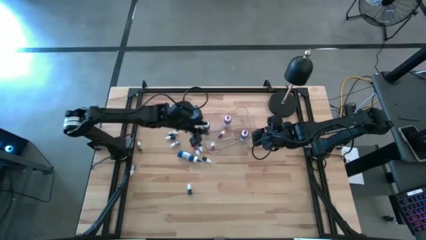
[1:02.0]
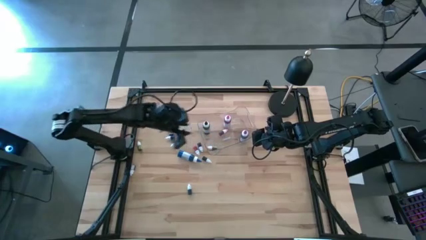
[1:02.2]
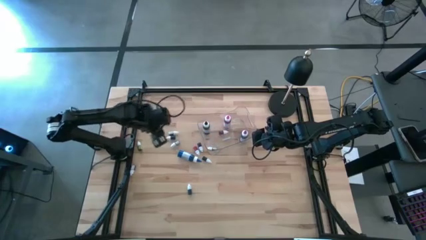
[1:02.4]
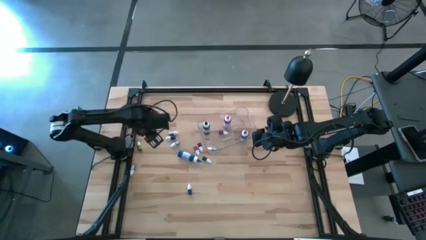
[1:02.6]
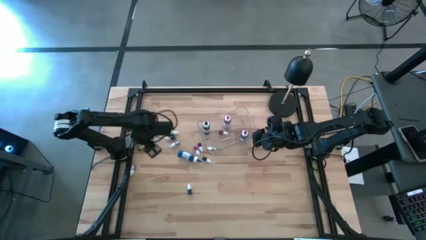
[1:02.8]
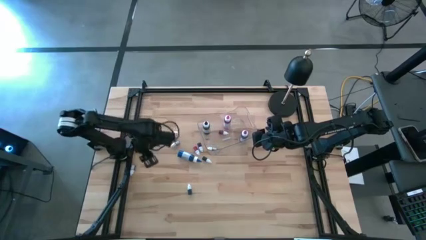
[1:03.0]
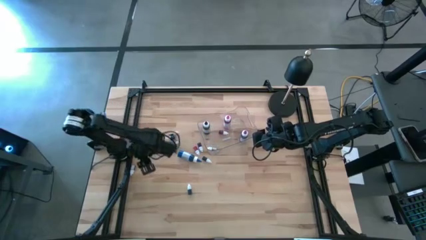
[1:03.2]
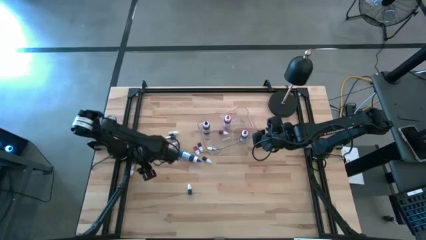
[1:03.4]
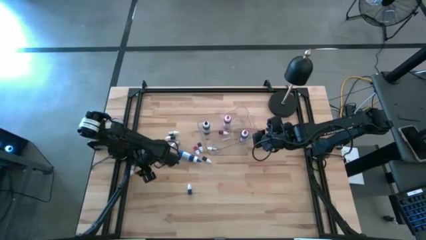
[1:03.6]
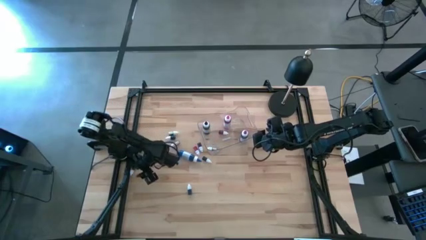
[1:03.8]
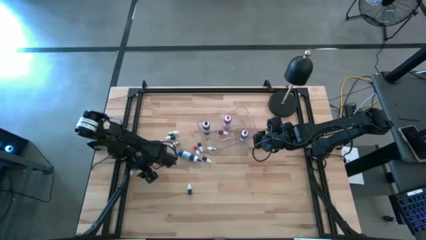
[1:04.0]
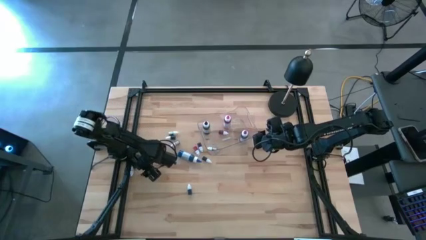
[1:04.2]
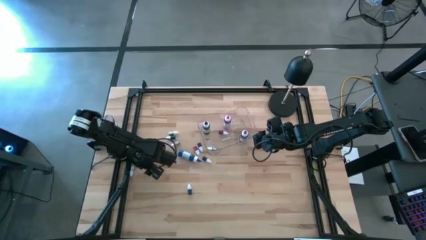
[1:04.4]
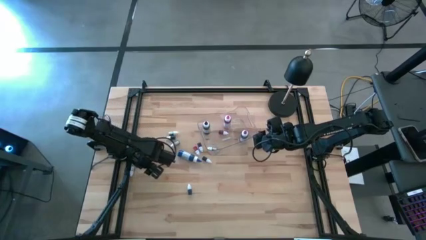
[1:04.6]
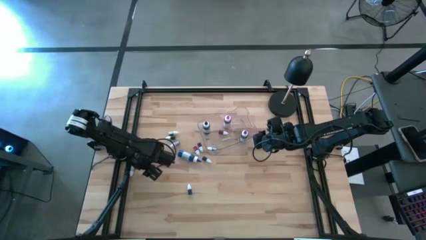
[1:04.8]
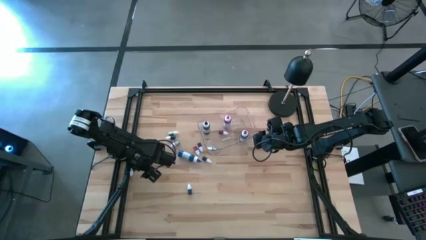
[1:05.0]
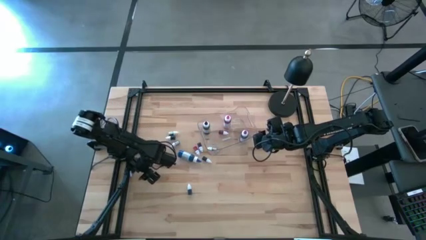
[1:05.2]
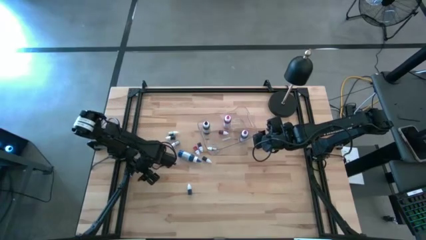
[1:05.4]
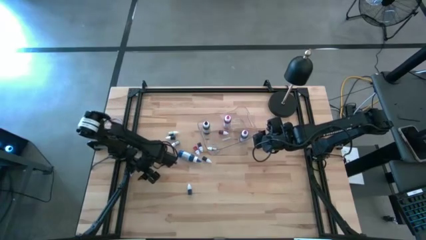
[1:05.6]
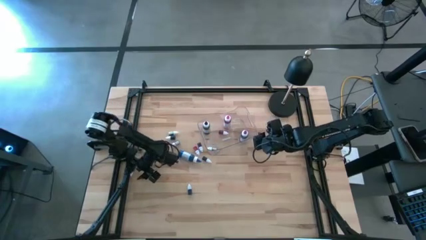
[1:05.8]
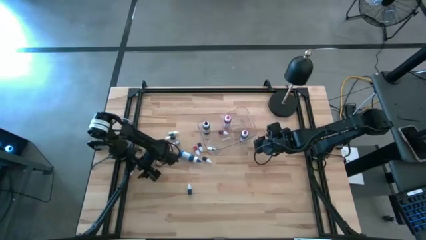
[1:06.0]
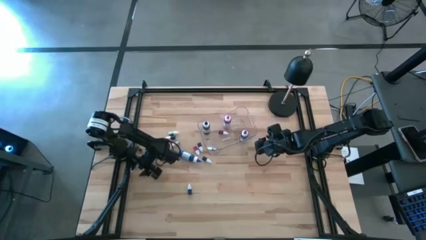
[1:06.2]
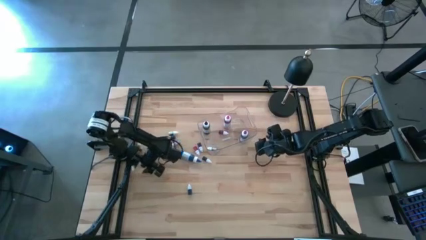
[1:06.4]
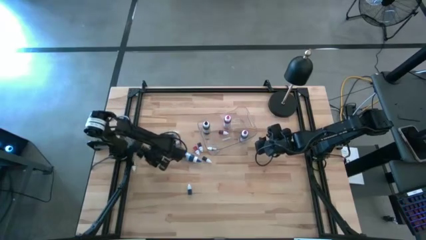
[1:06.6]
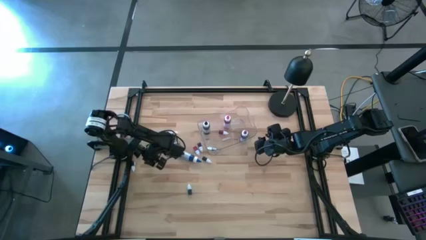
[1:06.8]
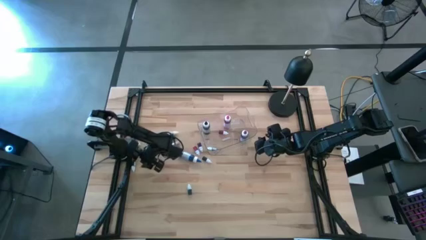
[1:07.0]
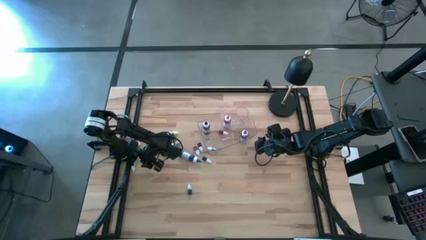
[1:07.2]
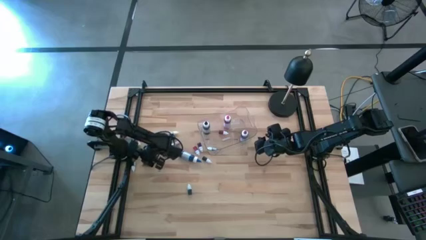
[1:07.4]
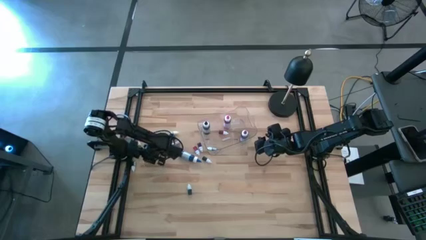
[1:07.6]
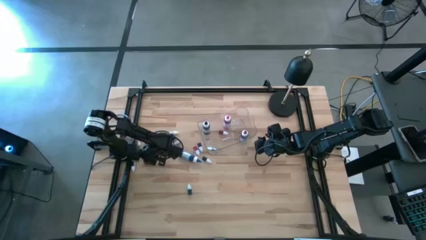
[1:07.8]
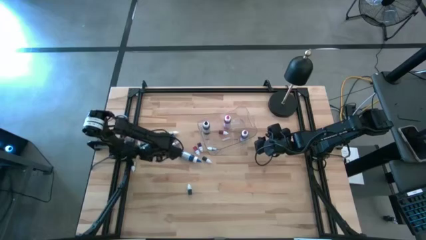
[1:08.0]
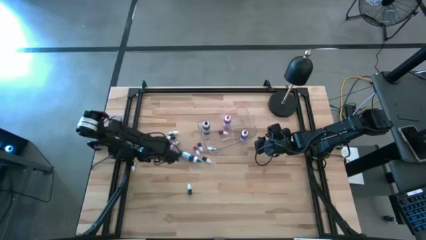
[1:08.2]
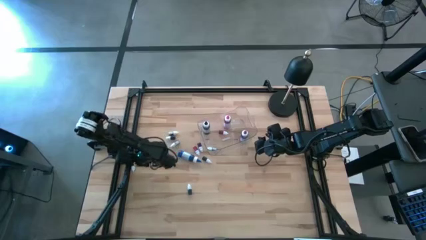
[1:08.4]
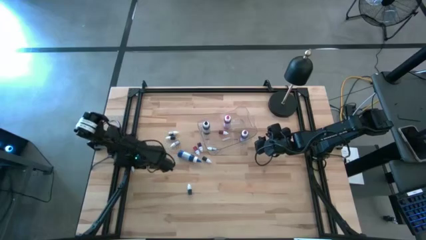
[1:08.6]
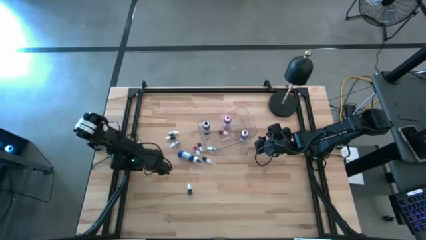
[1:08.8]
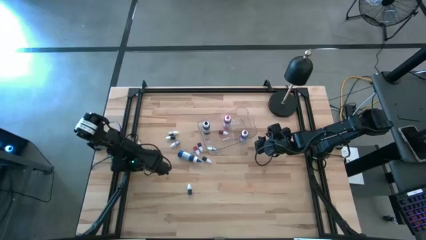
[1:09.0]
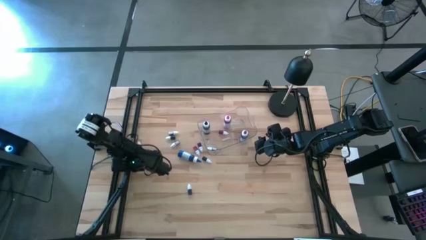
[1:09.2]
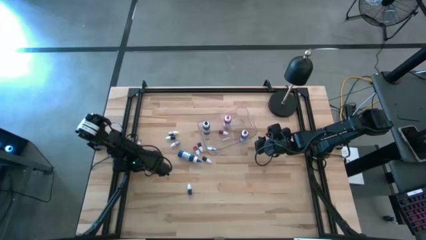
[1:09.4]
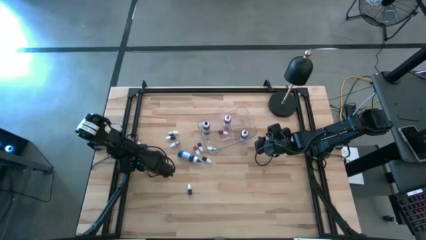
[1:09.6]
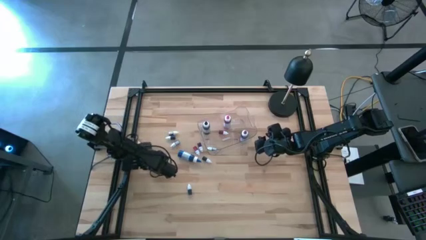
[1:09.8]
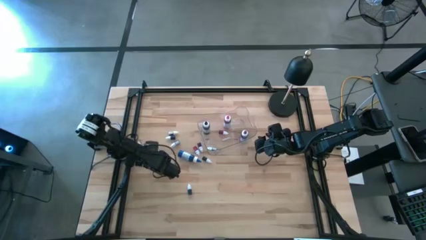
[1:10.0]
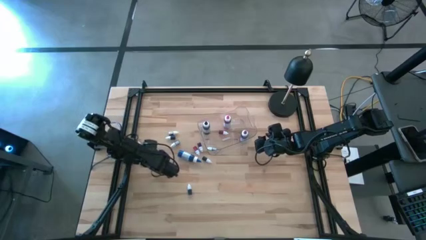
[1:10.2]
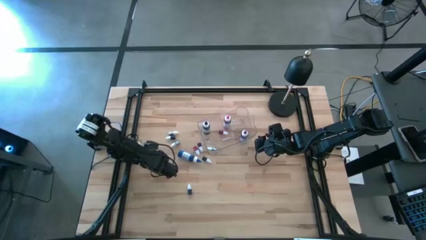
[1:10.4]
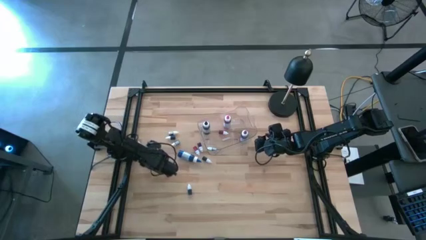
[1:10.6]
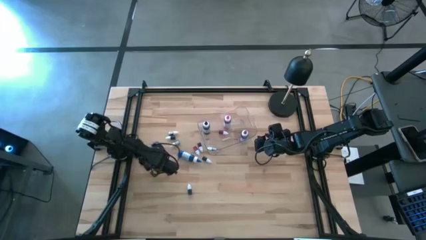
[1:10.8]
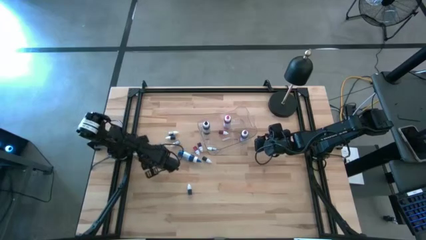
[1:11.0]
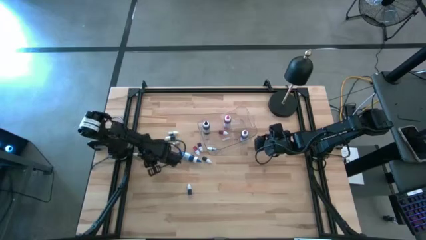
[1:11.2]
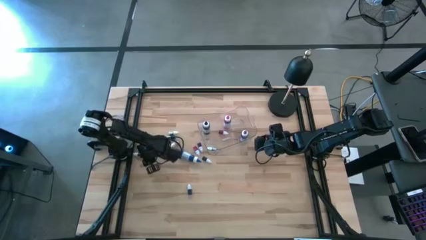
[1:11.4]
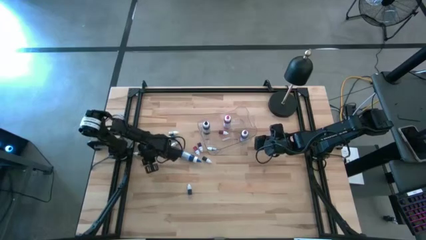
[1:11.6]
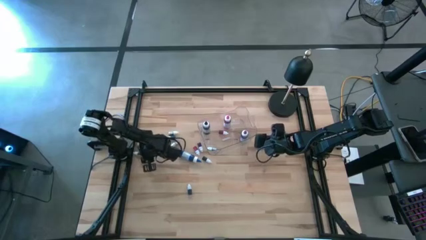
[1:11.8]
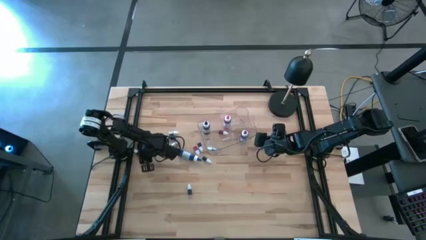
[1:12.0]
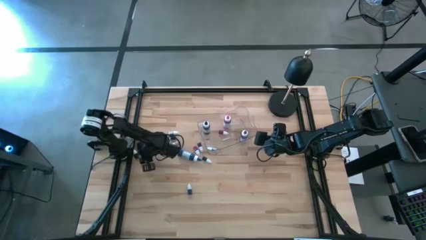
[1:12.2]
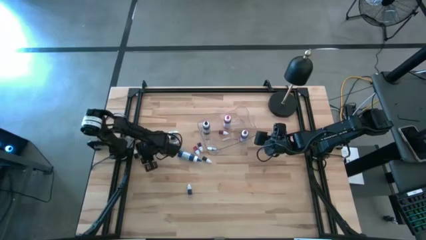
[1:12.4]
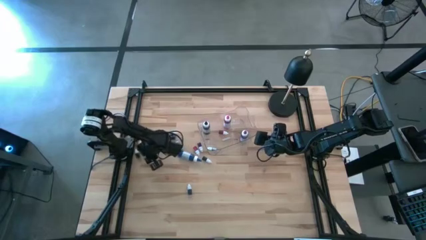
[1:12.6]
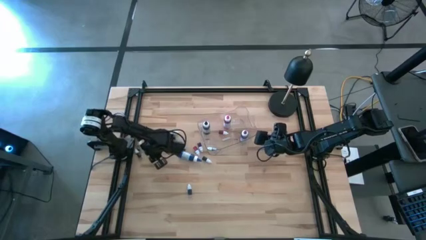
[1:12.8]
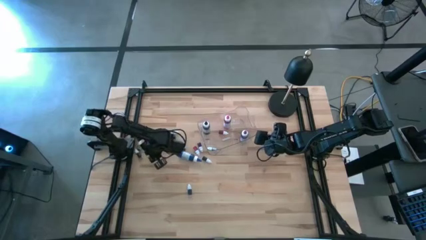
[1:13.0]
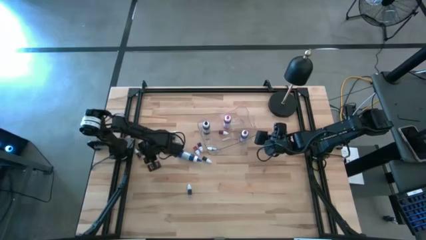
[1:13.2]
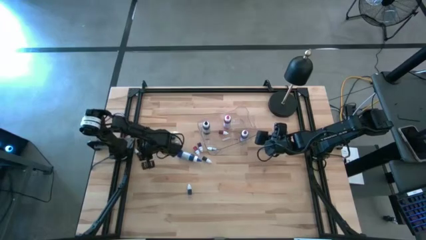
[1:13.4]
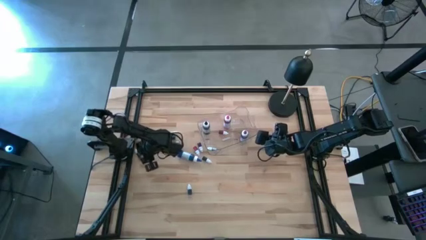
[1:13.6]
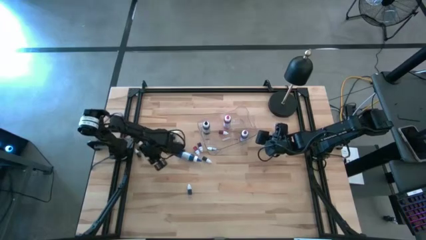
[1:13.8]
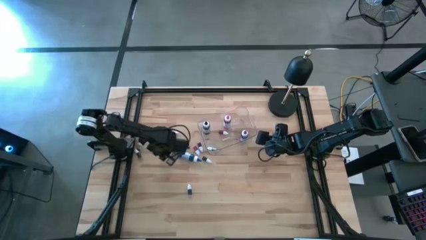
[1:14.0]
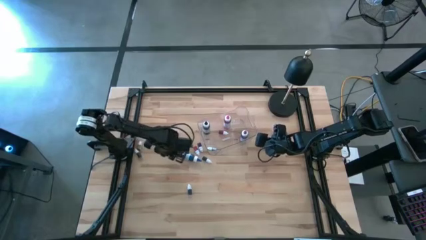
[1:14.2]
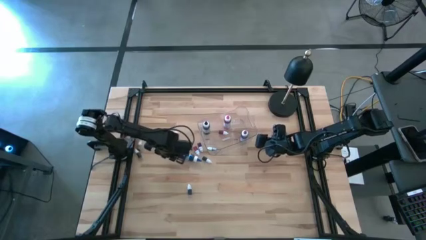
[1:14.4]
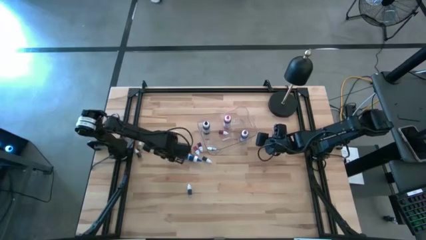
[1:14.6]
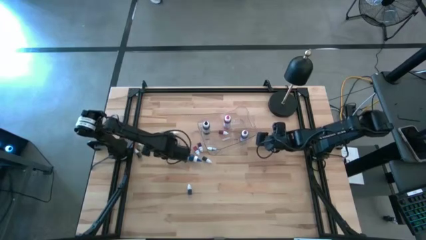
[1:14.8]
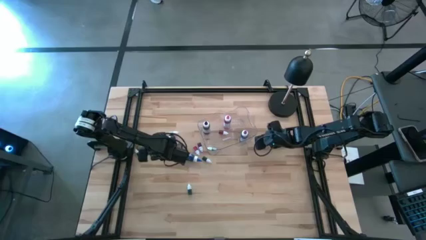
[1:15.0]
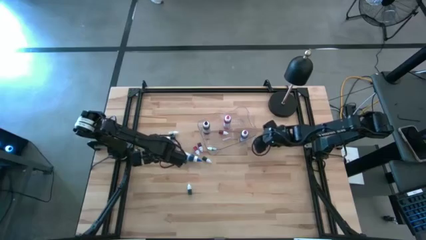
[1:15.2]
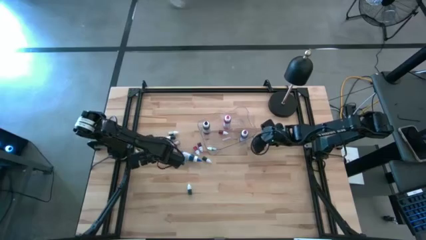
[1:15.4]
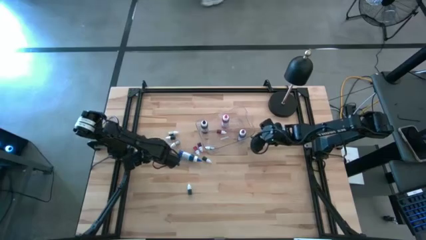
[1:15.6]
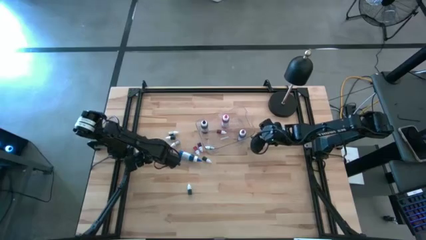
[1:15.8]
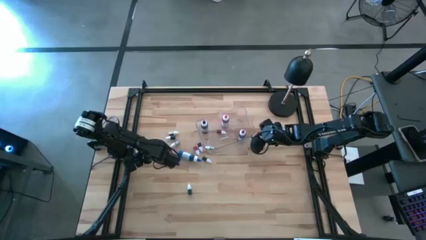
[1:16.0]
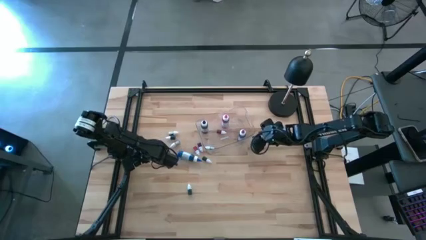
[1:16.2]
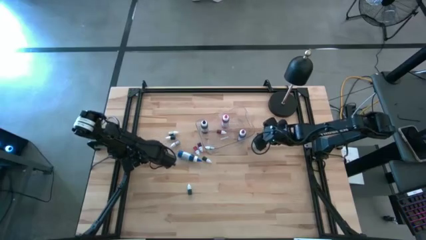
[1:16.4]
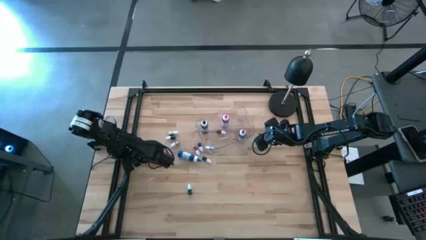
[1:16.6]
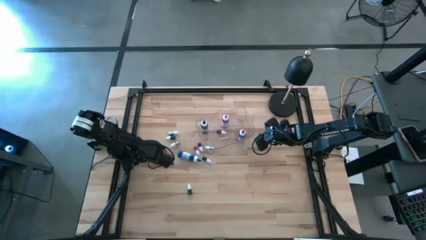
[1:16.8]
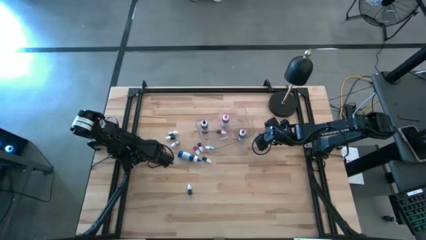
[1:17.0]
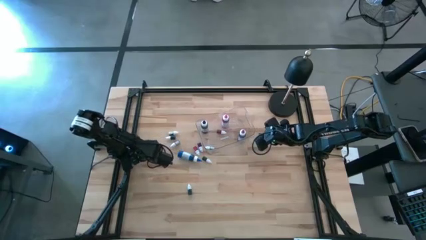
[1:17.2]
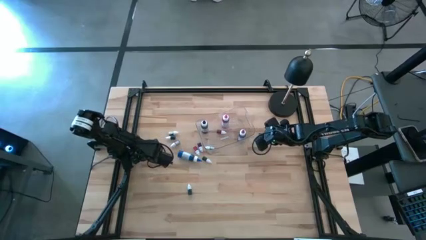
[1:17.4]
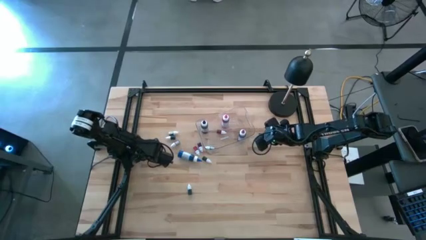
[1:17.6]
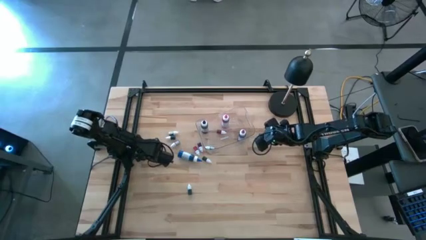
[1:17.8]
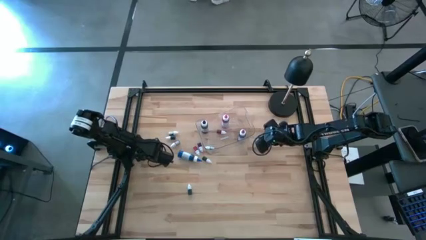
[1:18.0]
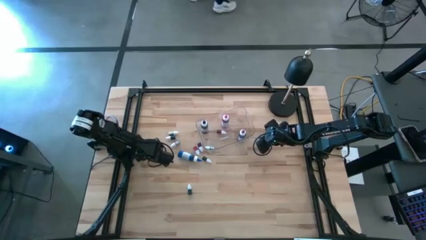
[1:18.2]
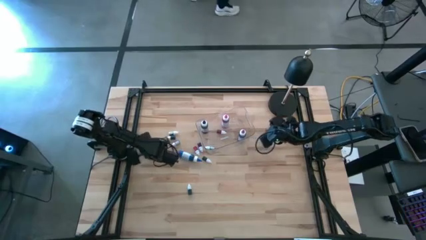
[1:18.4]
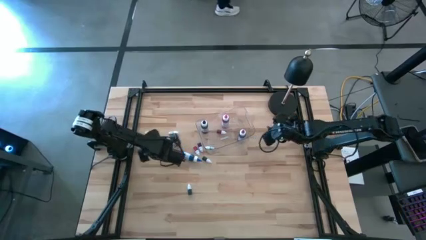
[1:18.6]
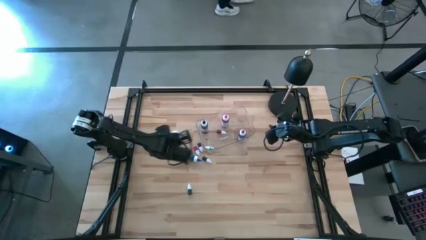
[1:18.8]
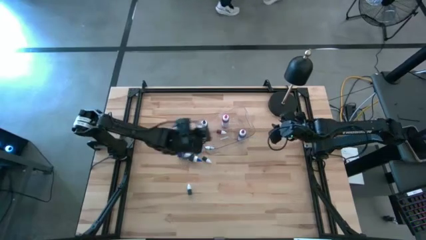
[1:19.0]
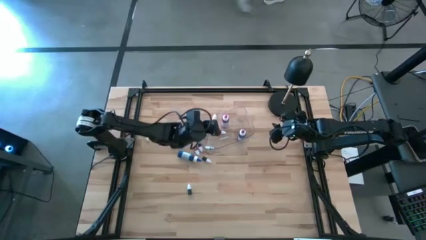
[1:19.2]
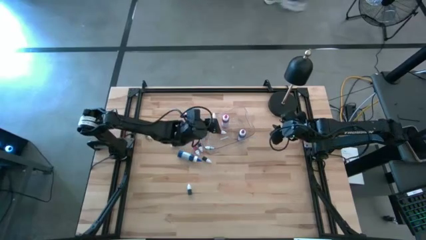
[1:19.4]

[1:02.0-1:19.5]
Task: Pick & Place food coloring
Put the bottom small purple food coloring bottle into the transparent container
